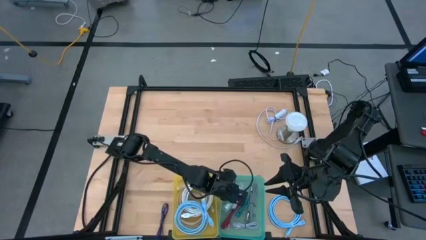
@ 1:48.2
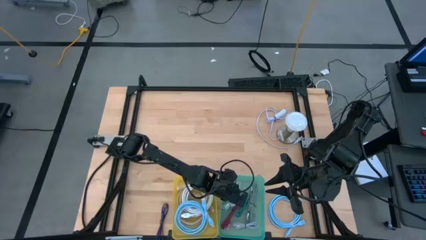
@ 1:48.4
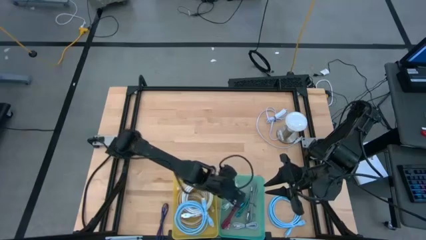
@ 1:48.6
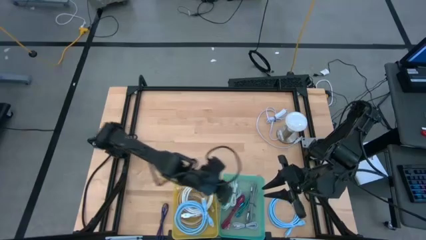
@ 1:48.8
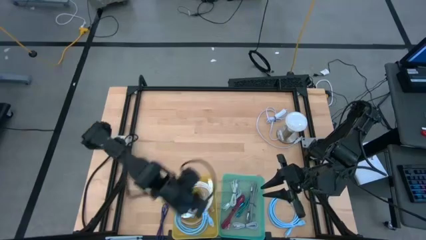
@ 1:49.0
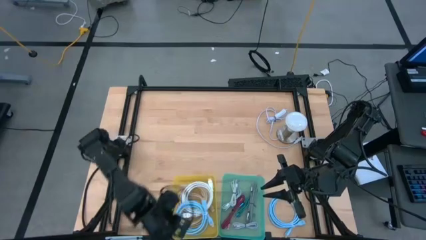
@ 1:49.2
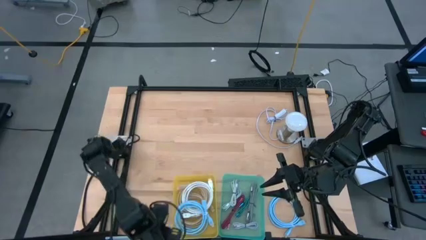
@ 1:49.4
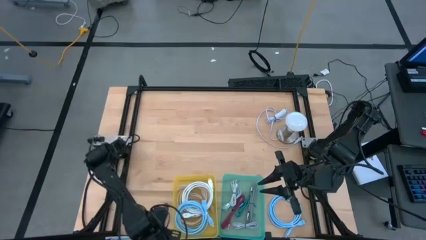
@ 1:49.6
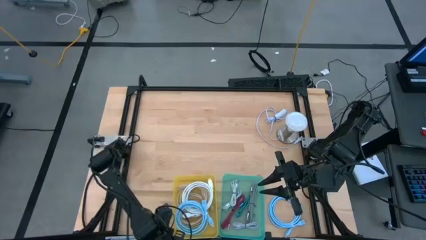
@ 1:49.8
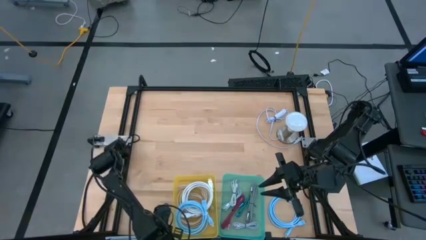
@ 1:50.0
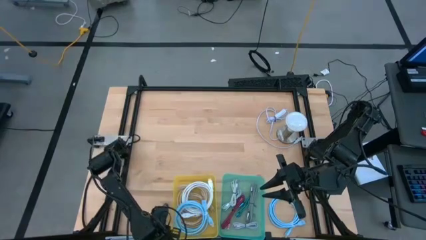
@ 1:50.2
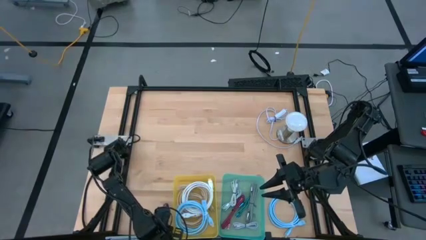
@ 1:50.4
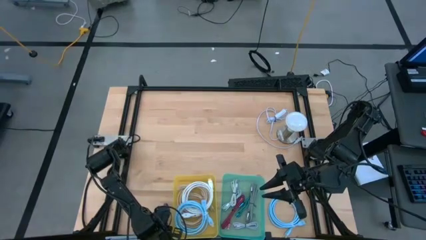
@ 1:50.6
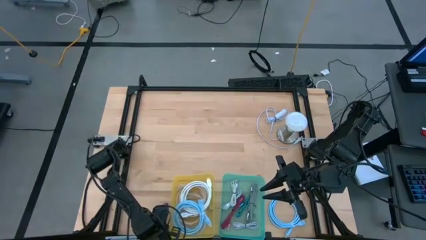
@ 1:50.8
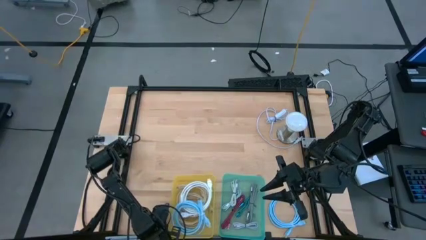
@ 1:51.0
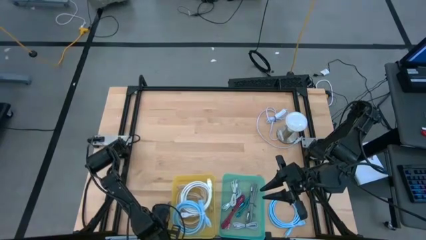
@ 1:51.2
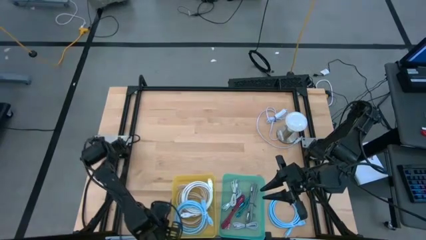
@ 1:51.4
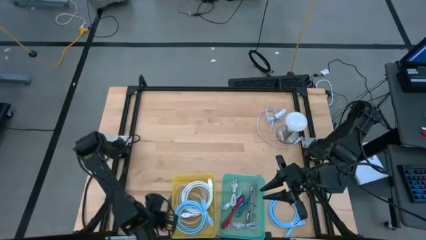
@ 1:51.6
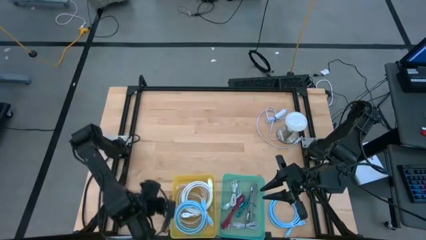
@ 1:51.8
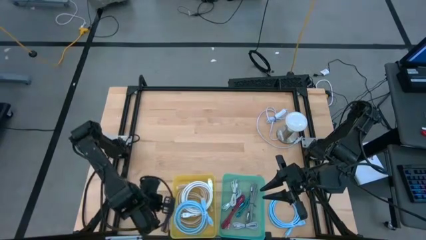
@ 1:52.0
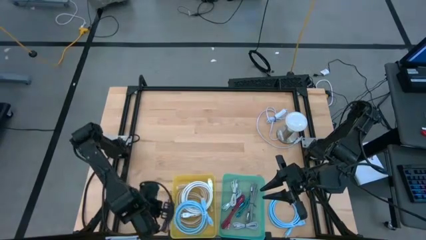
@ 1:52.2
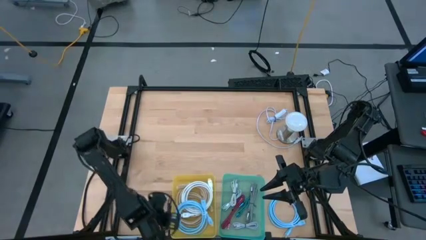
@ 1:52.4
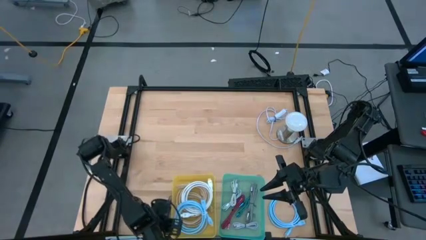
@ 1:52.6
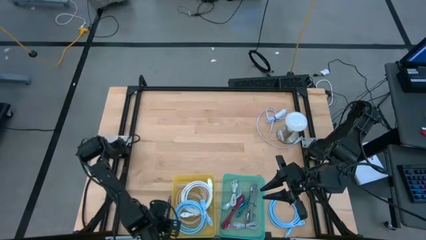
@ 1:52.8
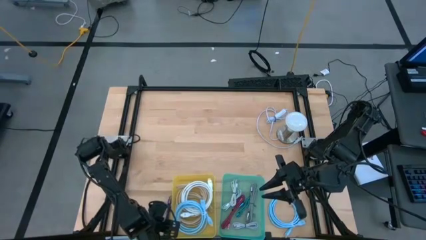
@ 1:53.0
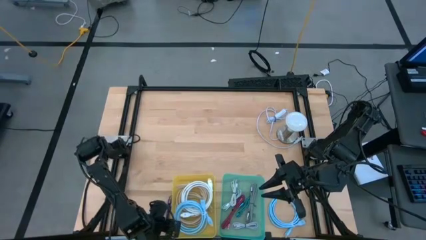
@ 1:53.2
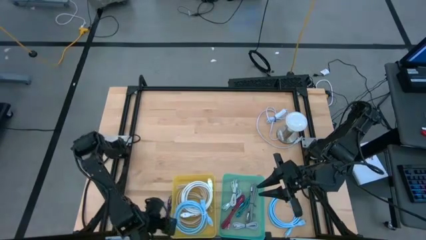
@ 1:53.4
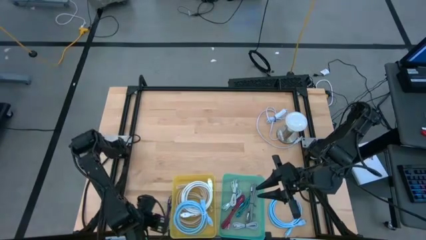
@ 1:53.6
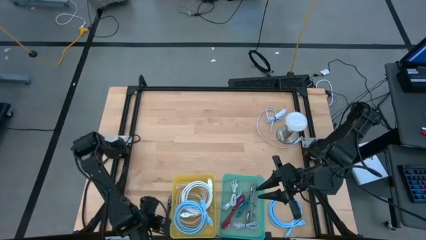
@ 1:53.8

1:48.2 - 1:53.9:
Task: Pick & Place USB Port
Put the black charger into the green bin

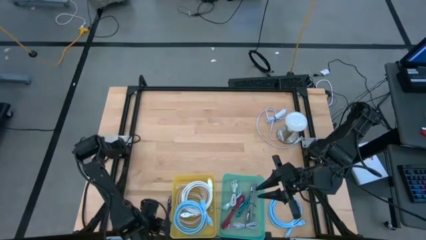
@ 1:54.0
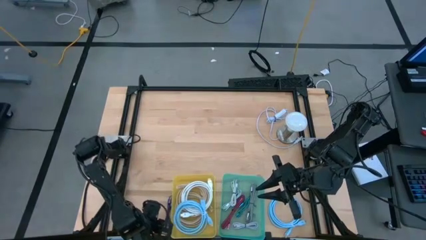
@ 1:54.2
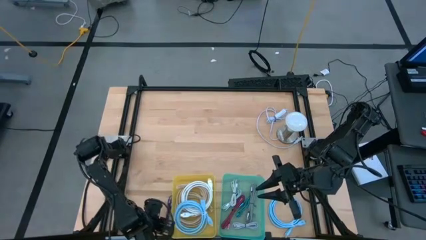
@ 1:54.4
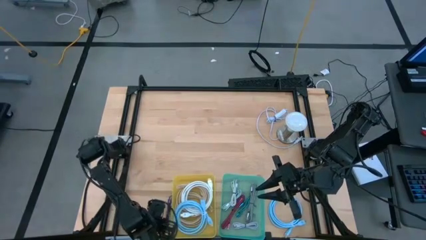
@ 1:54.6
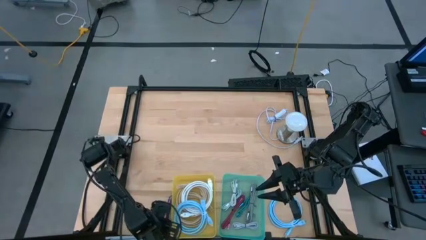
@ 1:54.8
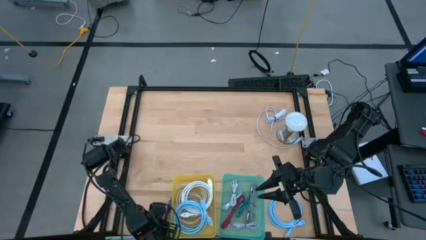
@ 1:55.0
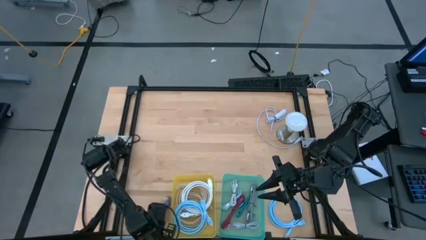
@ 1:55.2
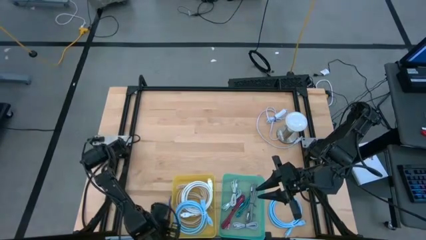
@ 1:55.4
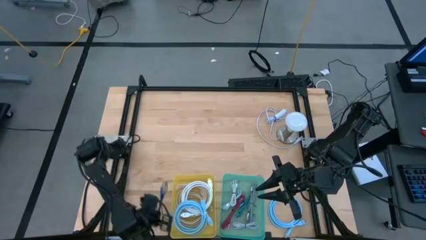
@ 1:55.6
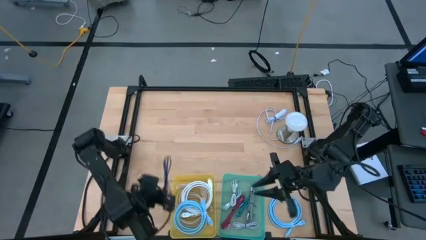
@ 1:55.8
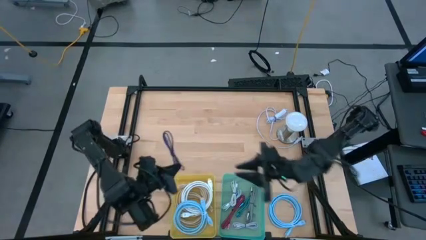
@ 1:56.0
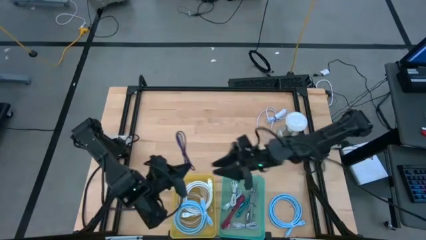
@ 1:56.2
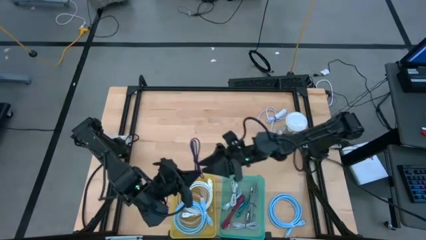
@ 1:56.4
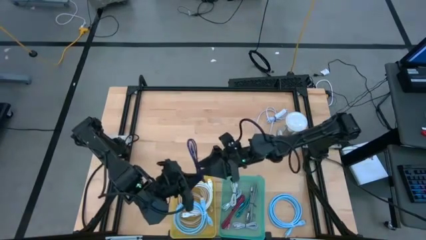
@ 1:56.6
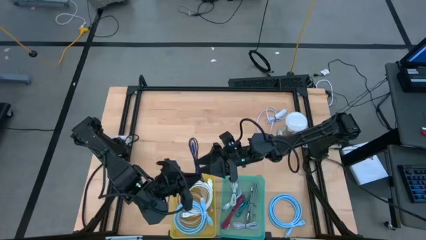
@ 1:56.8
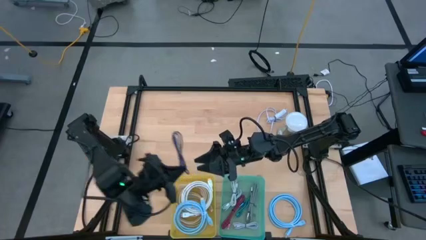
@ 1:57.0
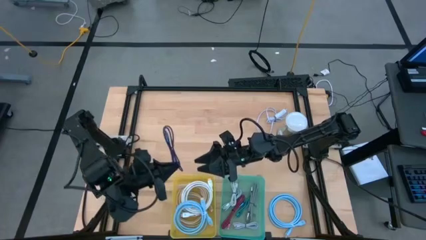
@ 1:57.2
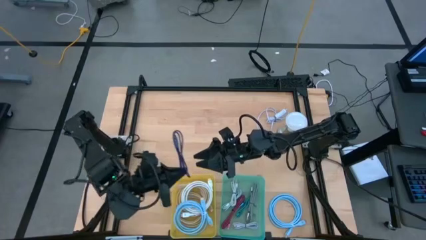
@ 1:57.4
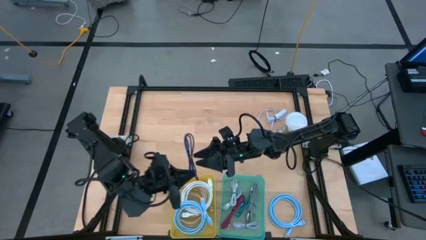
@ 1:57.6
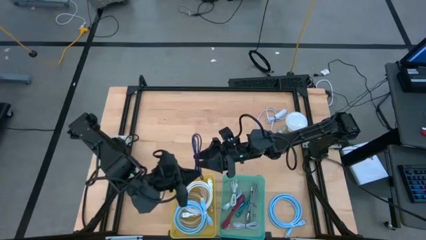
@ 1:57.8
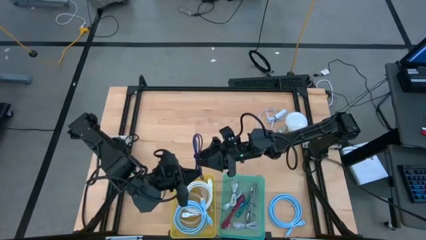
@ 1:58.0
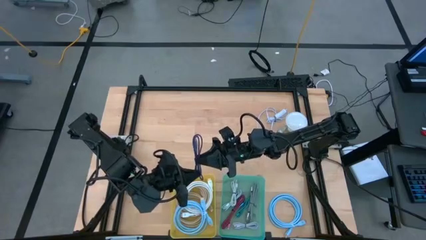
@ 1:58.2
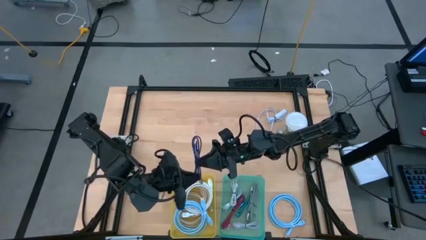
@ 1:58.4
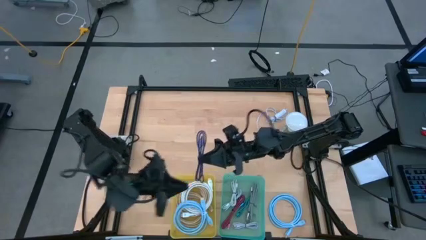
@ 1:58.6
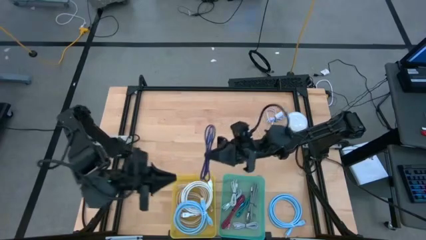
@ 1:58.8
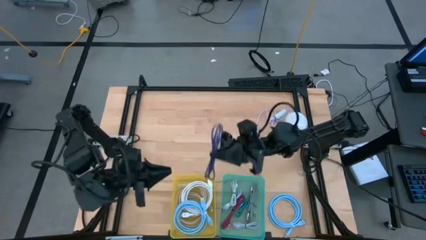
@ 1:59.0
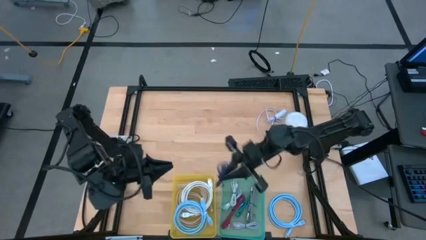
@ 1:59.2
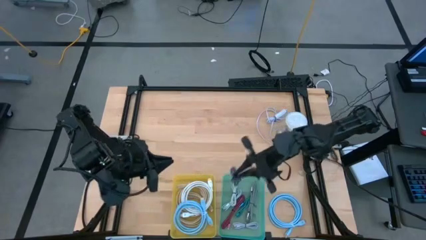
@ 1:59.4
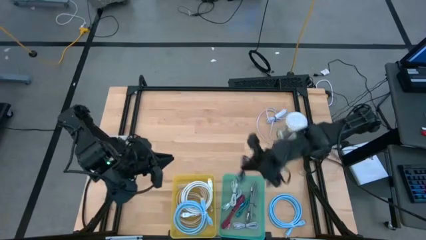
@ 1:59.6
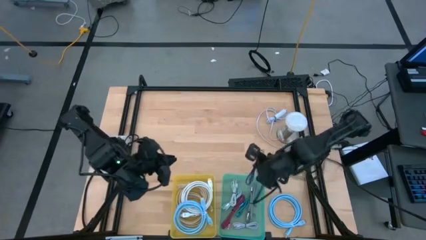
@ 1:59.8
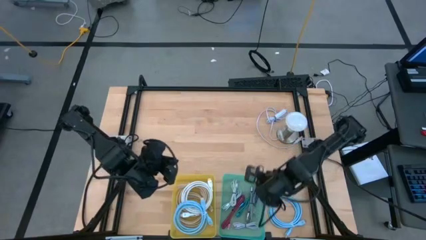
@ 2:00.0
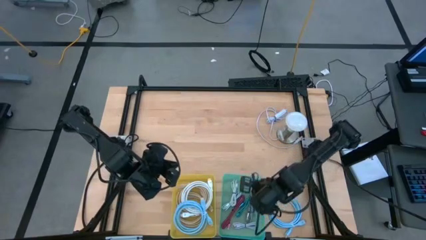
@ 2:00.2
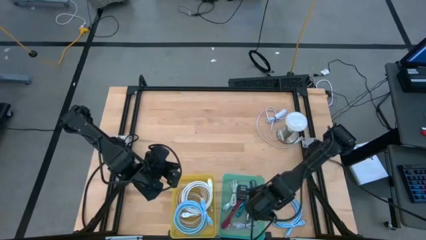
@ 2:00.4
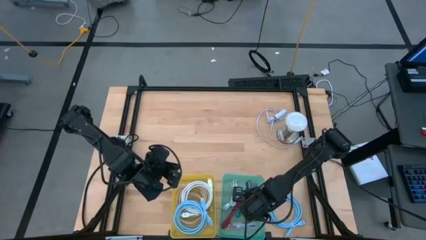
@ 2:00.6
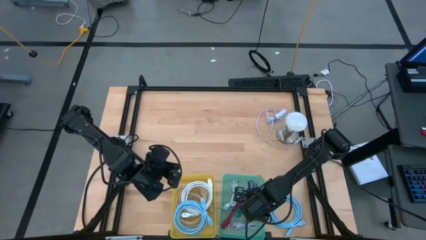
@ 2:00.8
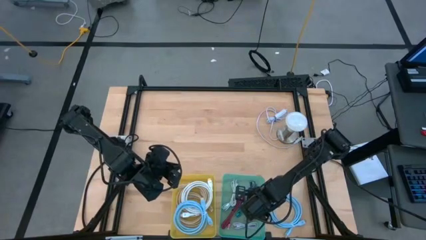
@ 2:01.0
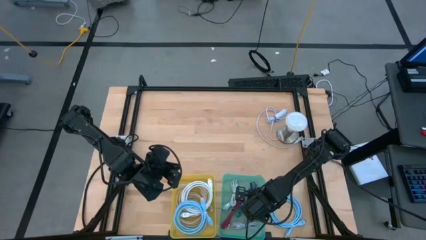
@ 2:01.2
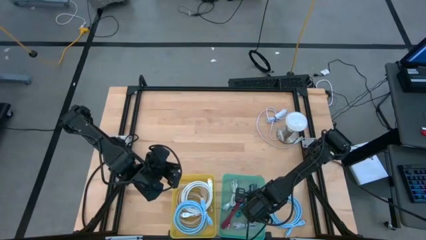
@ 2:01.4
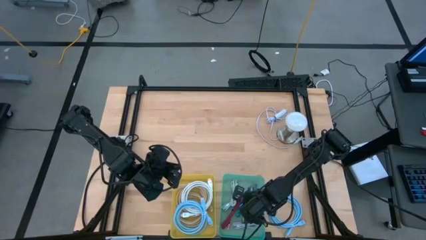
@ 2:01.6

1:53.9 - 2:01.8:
Put the small dark blue charger cable into the green bin
